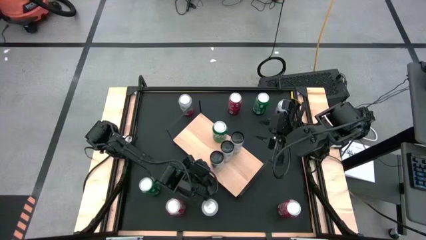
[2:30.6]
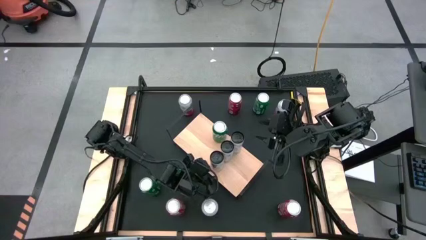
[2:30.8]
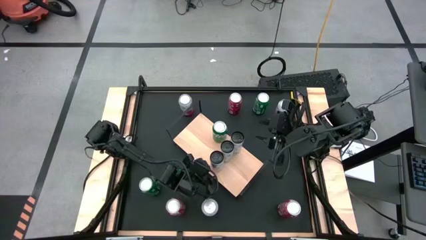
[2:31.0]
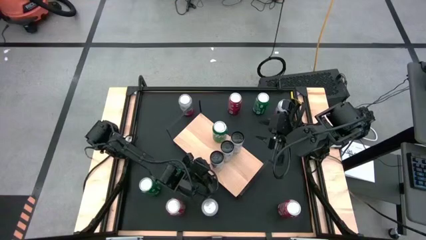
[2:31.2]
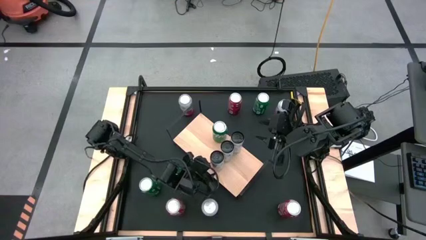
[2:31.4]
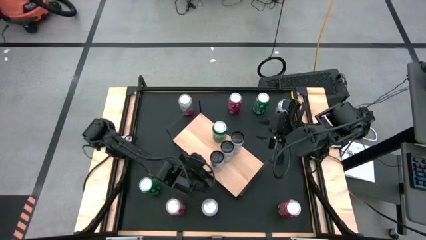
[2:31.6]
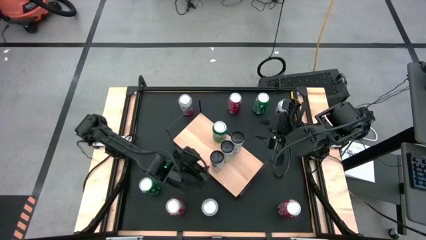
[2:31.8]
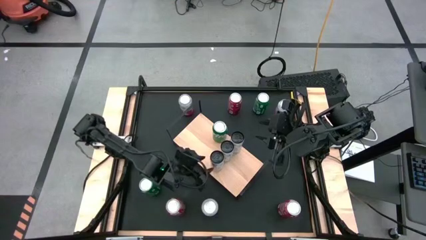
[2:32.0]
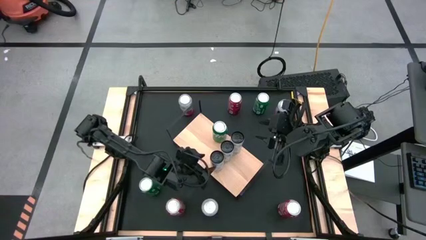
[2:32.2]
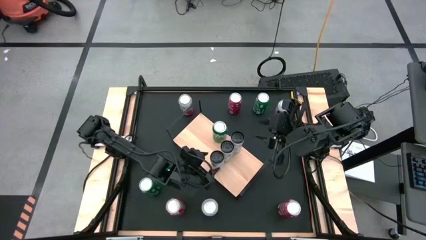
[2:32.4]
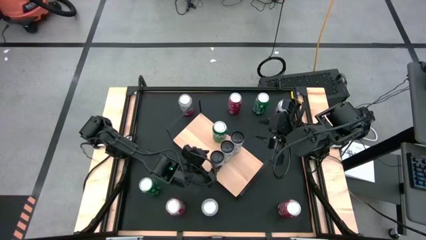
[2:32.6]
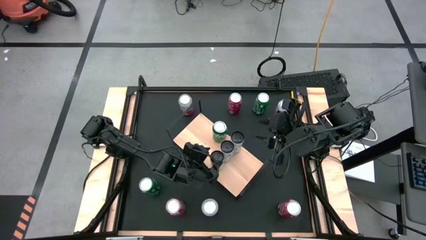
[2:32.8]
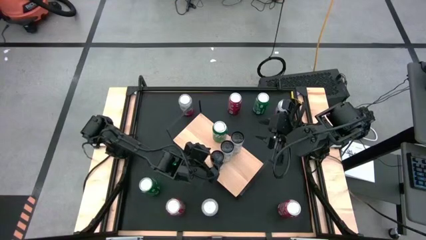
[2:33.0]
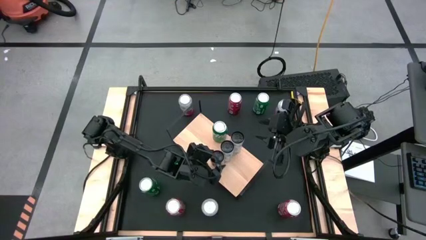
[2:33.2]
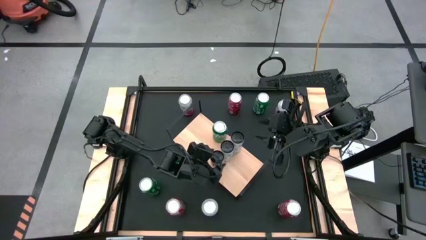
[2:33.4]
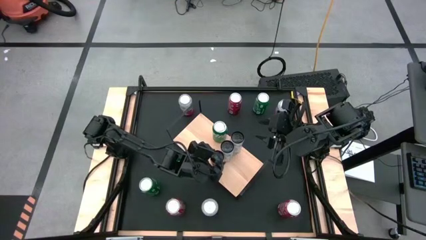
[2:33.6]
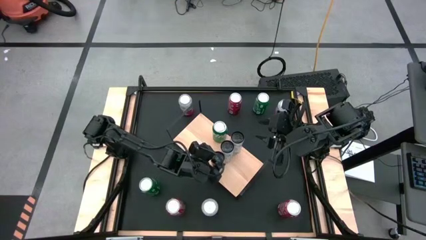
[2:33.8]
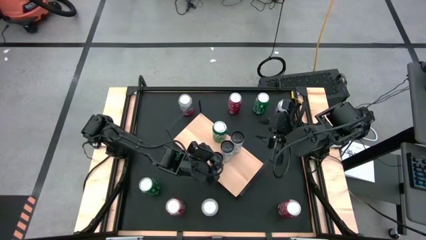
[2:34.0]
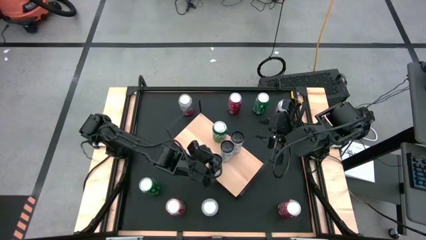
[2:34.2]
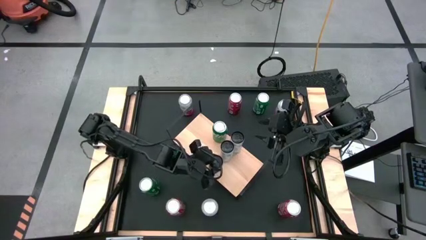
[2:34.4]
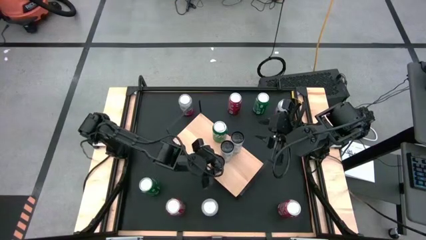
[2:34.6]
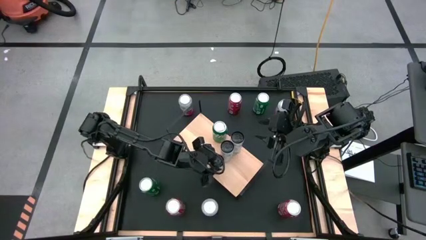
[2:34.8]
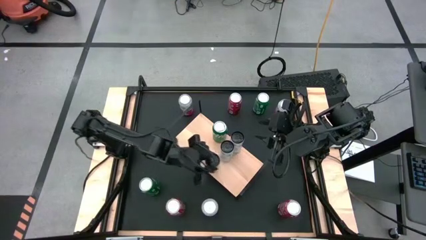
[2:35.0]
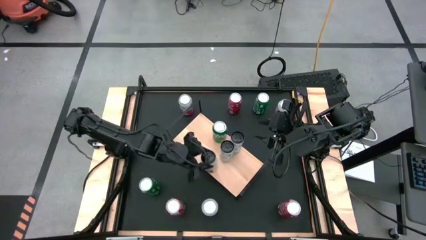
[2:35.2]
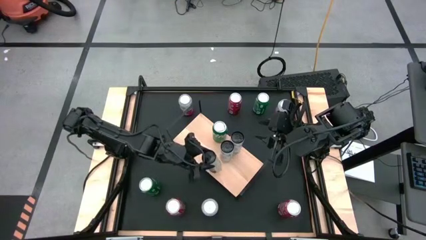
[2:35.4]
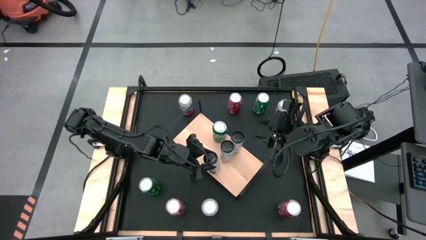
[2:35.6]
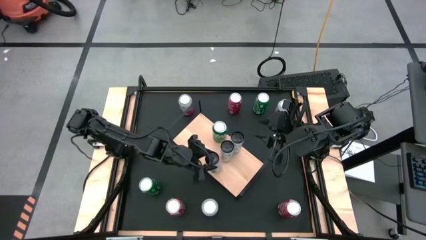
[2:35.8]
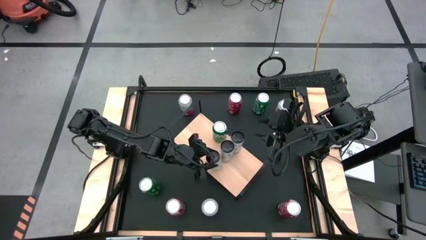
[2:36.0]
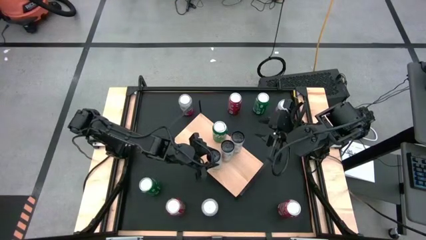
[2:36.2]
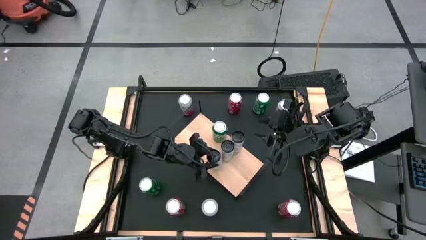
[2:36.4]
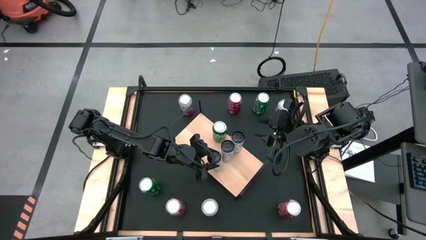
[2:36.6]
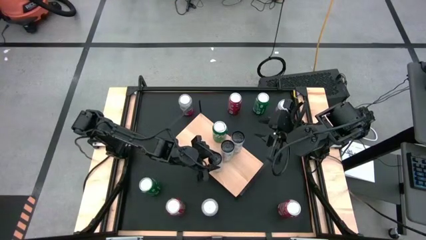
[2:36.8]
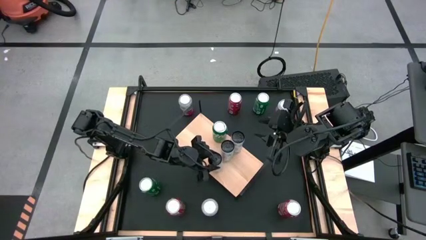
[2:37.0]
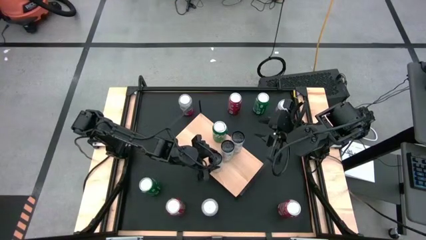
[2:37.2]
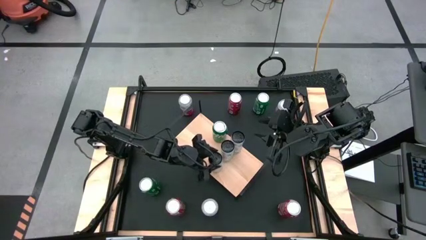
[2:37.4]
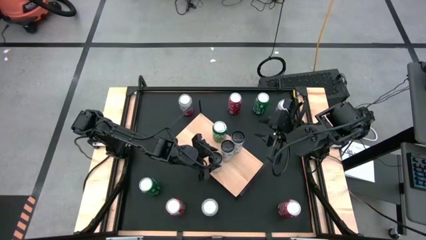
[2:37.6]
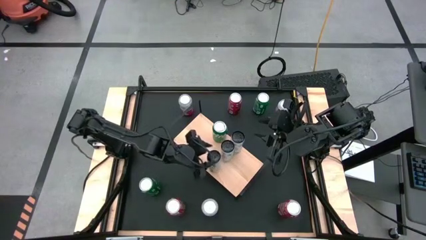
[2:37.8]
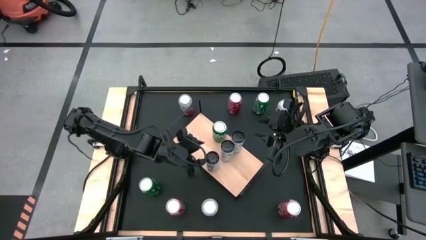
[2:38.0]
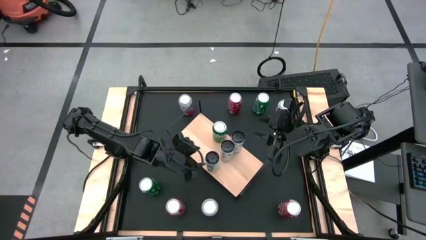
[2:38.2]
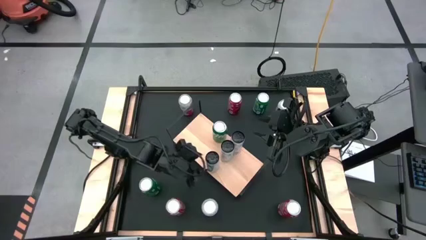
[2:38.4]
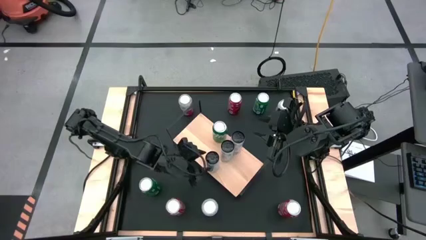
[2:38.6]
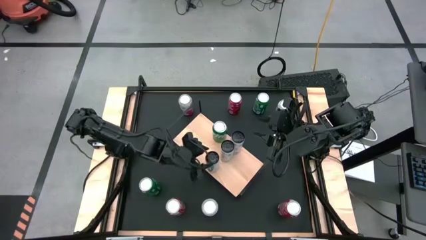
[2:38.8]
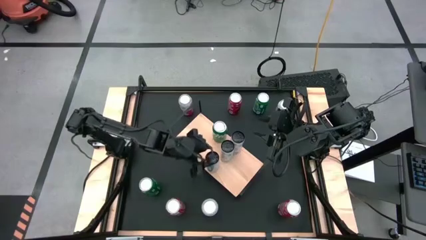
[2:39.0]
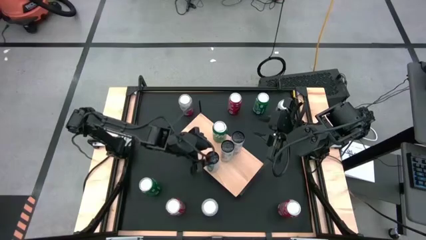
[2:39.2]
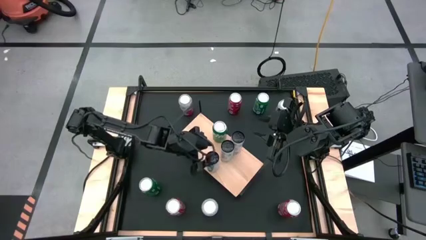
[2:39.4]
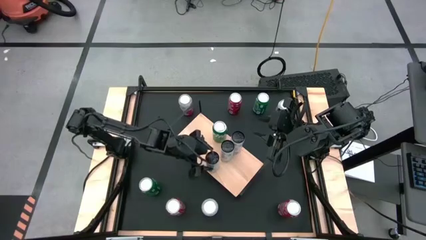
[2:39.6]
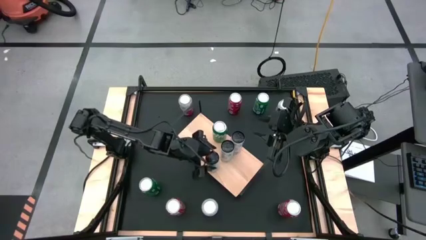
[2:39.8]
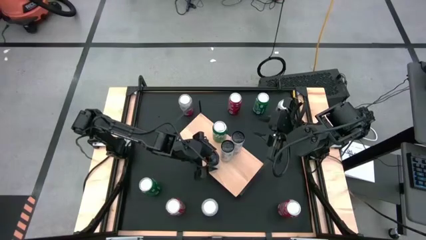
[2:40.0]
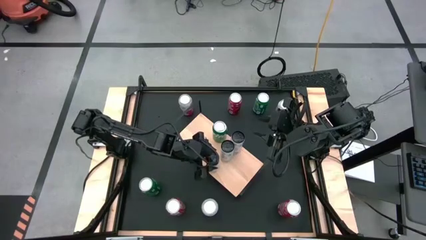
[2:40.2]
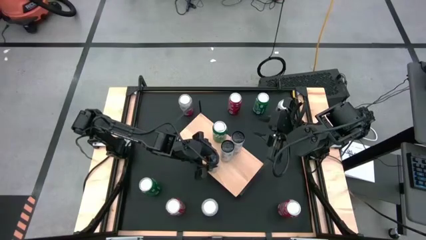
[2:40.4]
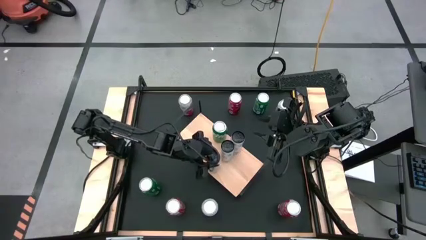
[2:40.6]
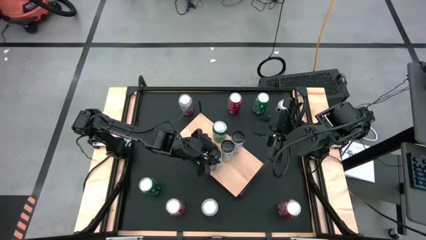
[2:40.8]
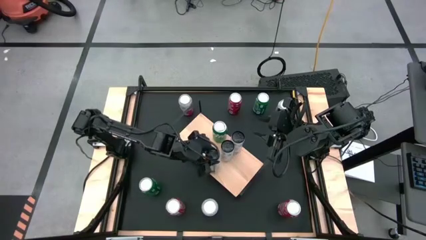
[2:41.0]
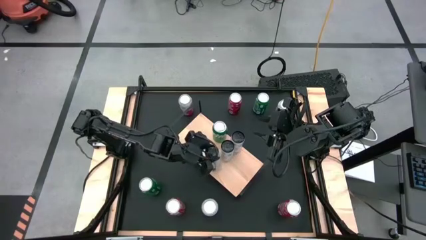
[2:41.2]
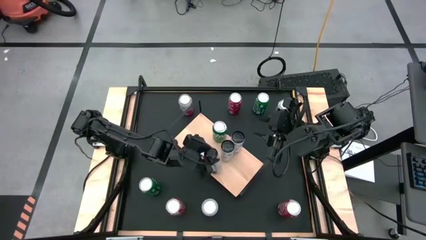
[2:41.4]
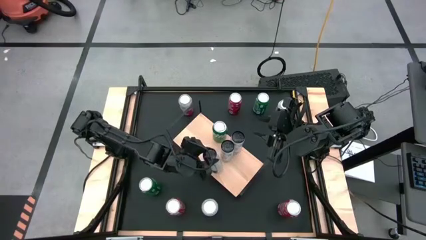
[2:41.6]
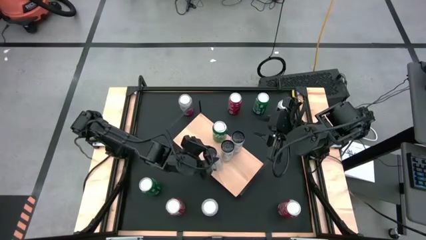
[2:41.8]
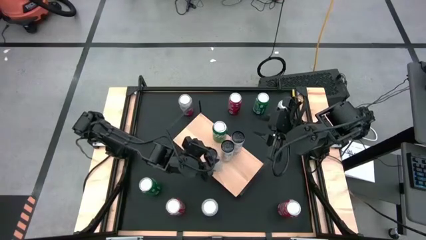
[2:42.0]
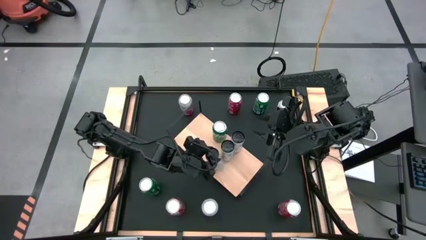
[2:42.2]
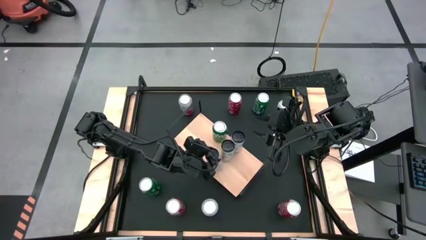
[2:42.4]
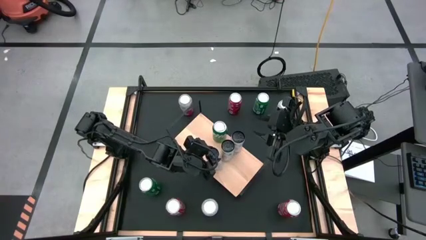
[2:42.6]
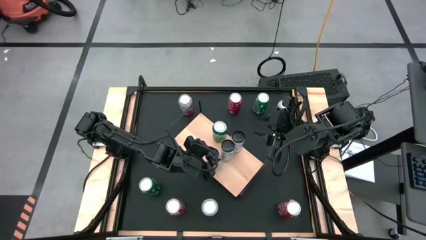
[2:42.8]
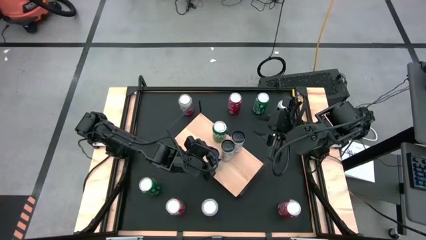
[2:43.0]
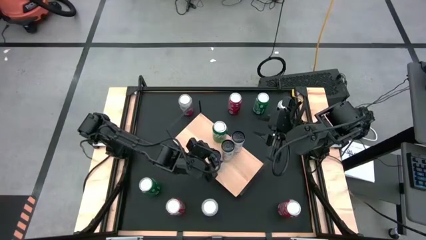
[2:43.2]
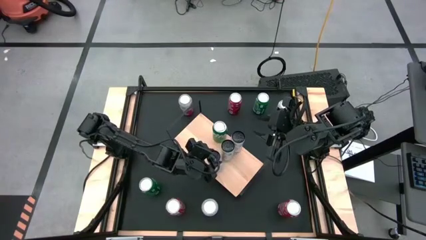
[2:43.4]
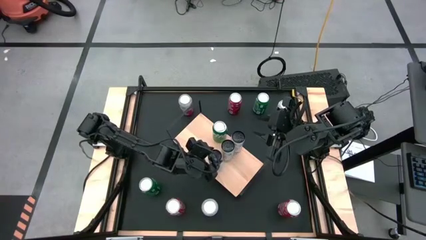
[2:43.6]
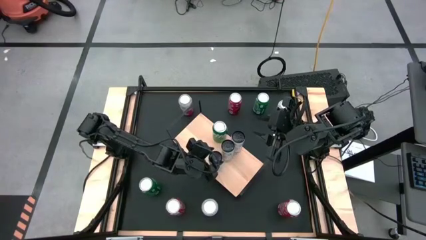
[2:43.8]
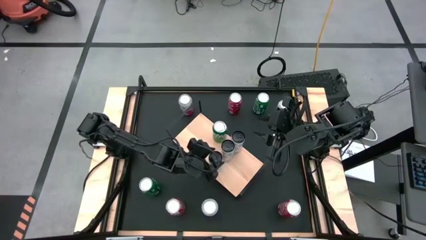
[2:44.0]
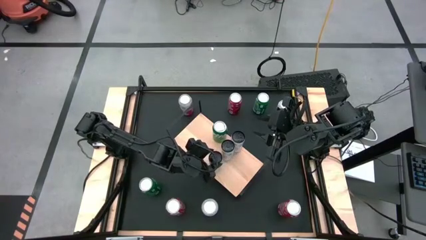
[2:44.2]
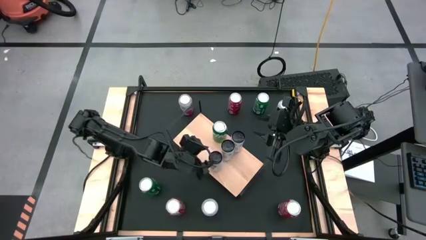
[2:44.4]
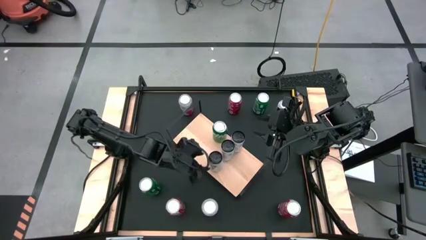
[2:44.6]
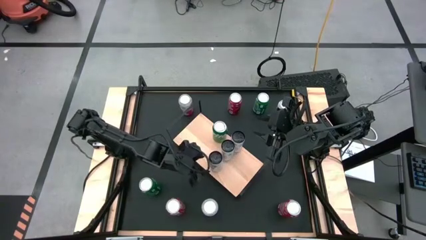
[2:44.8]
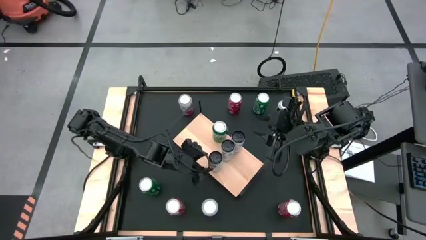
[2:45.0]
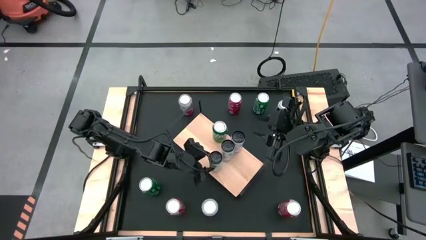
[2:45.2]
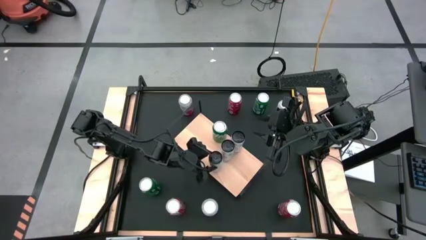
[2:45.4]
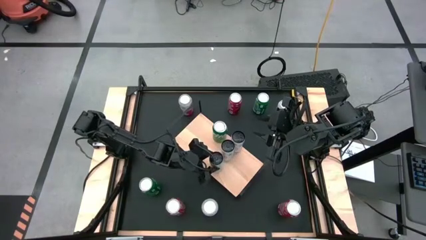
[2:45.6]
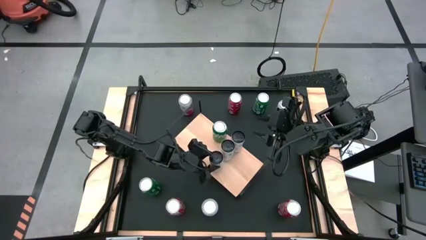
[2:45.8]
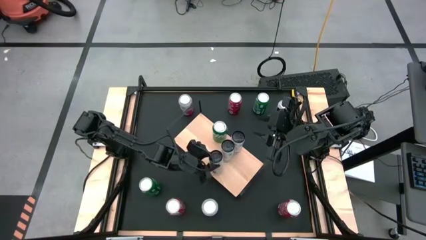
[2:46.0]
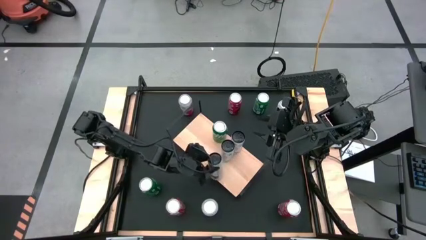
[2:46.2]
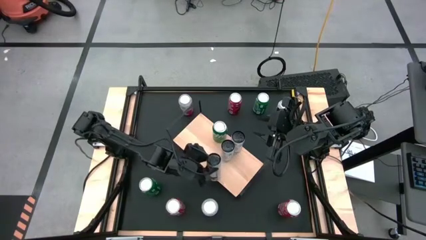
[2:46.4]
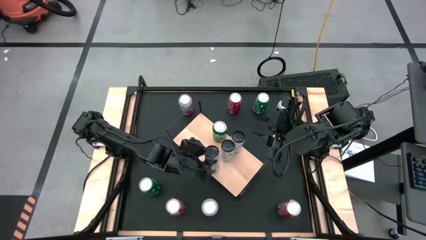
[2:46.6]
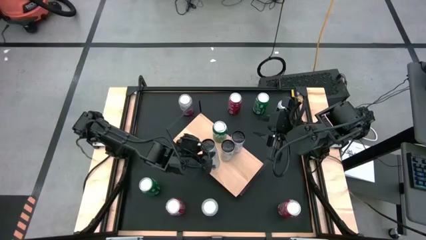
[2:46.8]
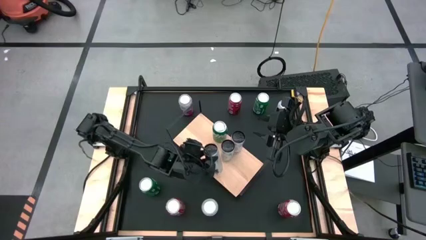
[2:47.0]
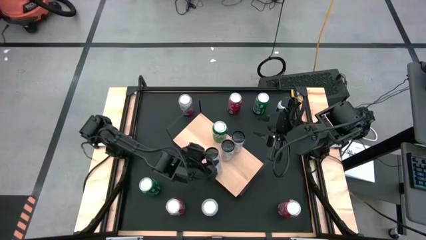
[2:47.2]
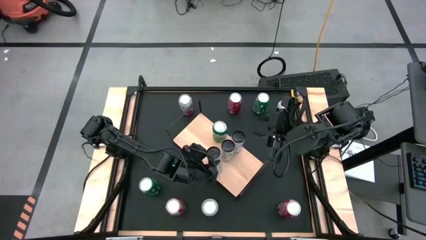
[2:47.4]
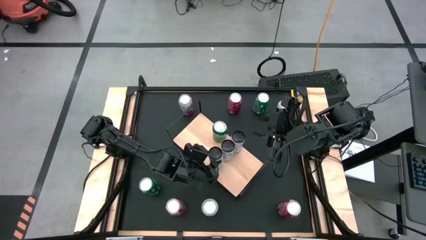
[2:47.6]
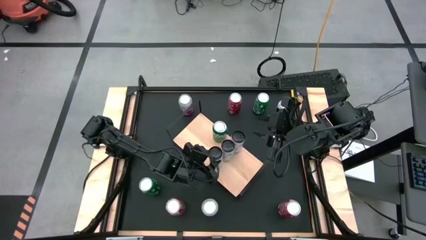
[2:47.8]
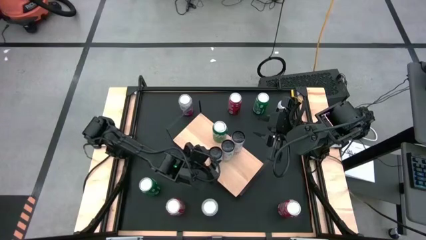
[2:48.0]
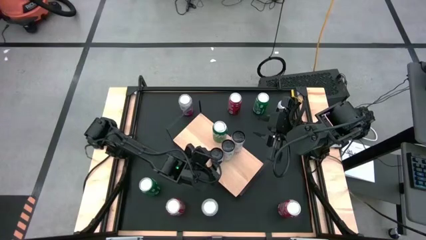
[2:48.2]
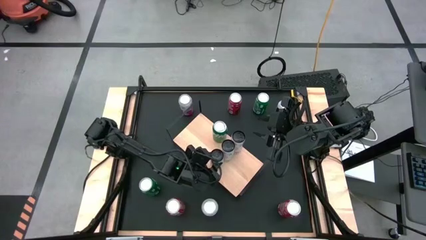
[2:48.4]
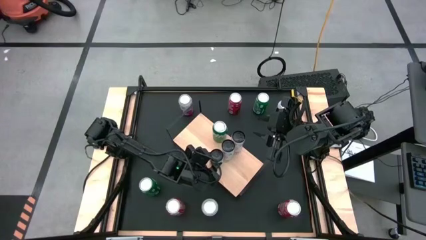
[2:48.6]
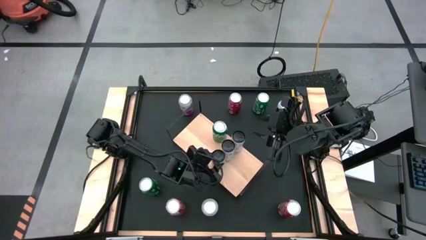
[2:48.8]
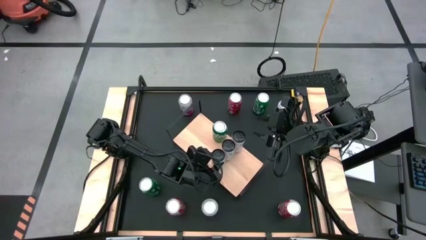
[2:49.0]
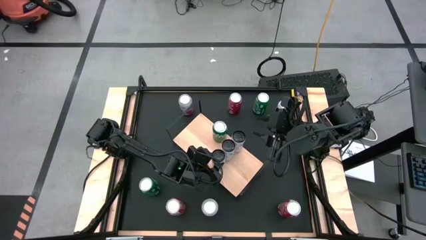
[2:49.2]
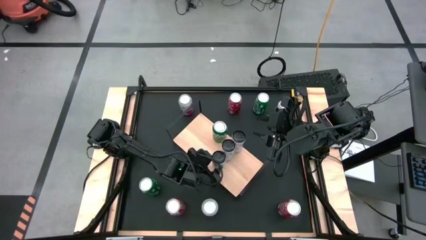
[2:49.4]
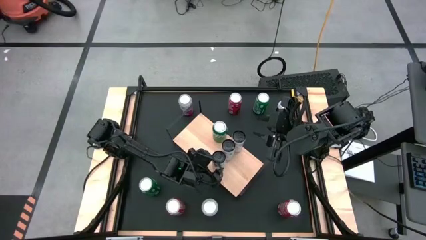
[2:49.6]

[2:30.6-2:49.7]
Task: Place canned beverage on shelf
Put the white soda can aligned with the other white soda can
